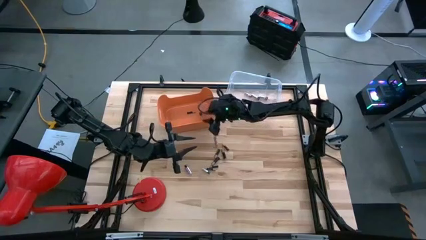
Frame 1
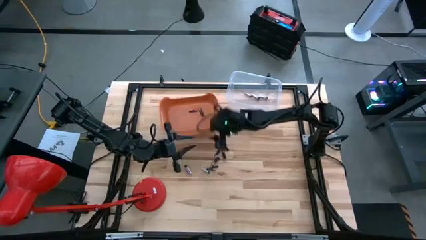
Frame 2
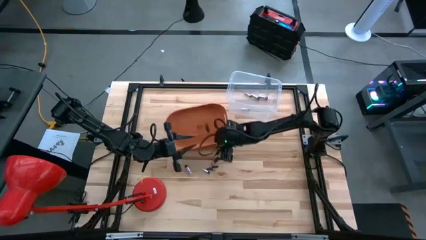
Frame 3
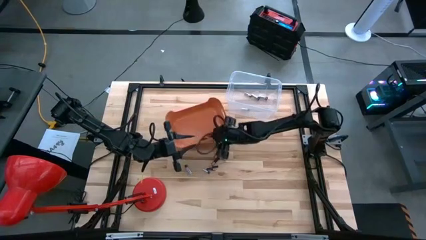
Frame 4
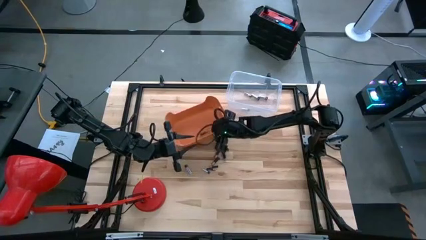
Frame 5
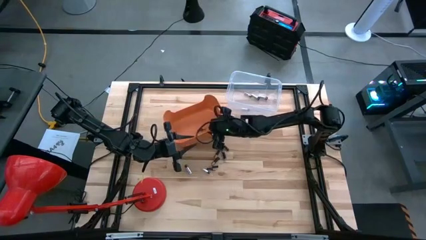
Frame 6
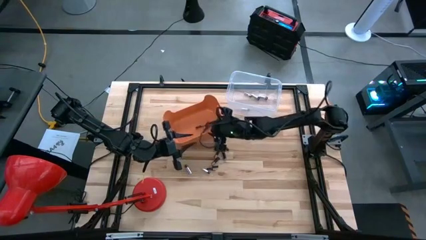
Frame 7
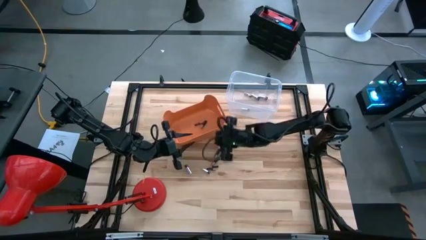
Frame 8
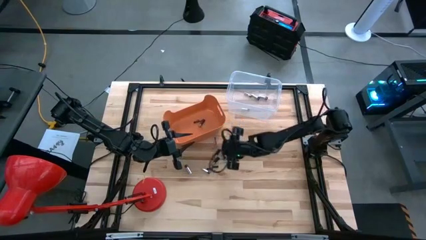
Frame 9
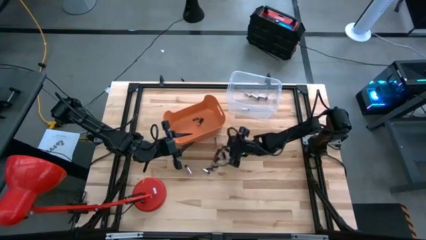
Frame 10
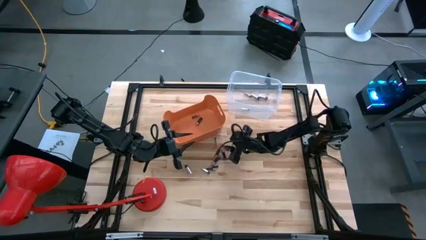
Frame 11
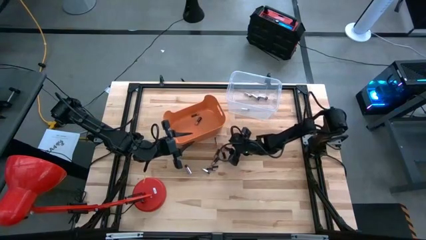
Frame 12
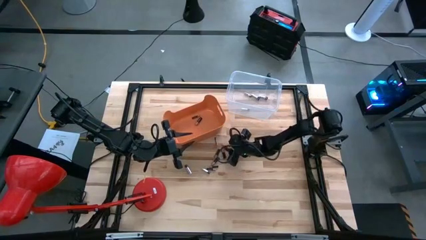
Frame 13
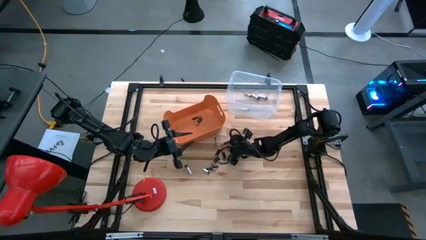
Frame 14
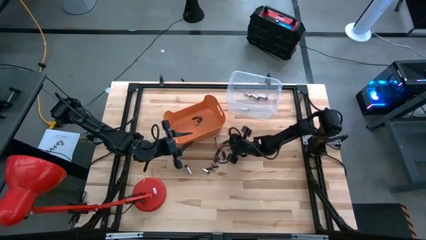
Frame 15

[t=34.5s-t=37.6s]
Task: Sort batteries
Put the black battery into the orange bin

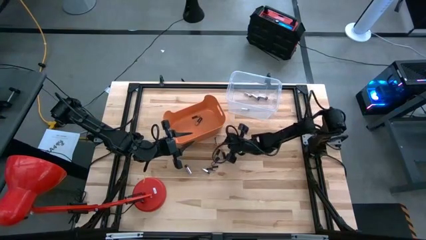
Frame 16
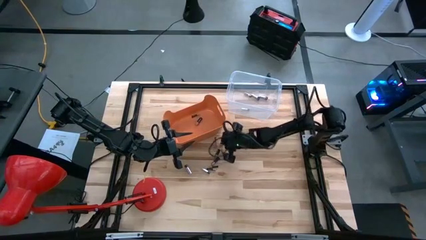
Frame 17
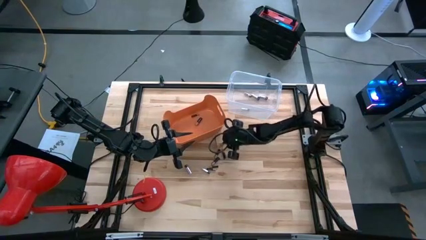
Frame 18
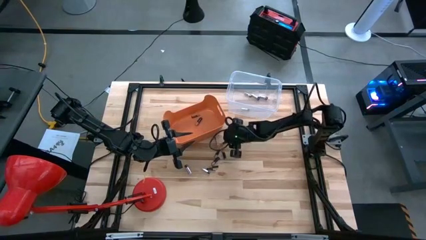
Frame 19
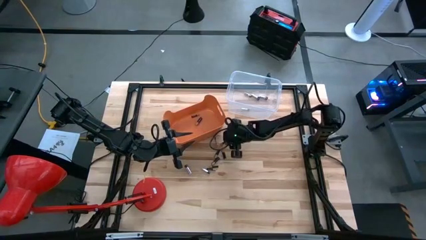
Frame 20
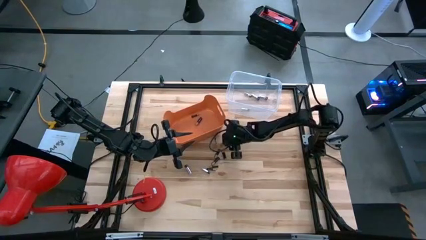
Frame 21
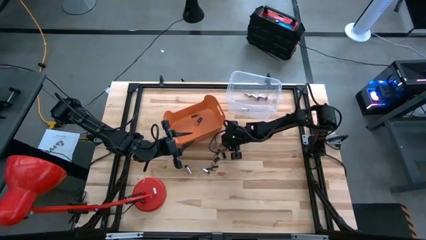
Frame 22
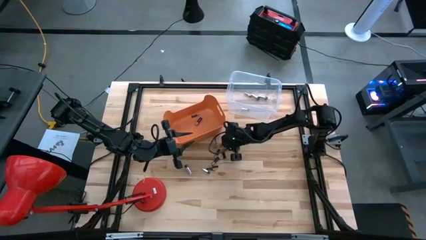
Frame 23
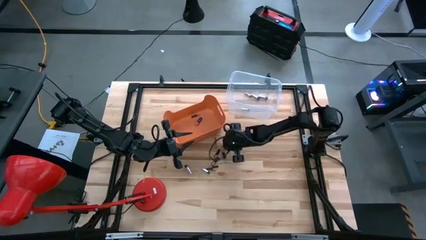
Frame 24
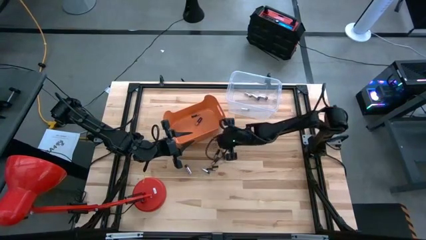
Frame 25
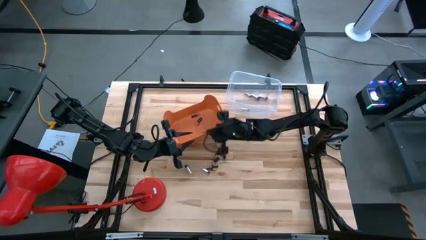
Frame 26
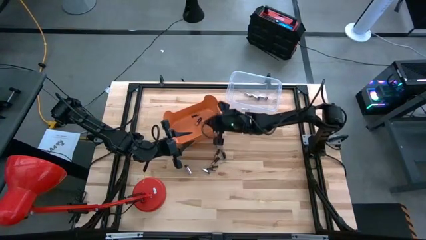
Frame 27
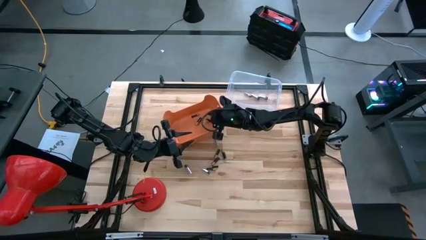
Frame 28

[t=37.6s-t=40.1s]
Put the black battery into the orange bin

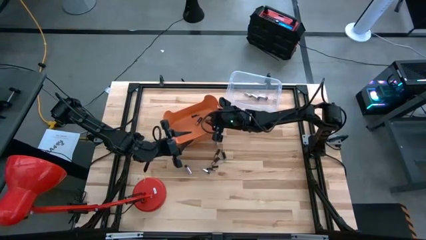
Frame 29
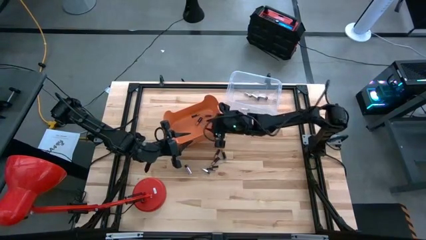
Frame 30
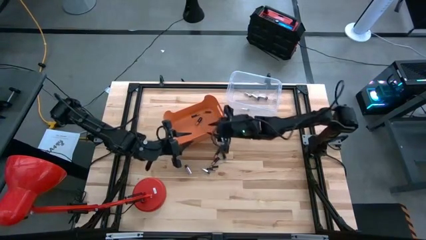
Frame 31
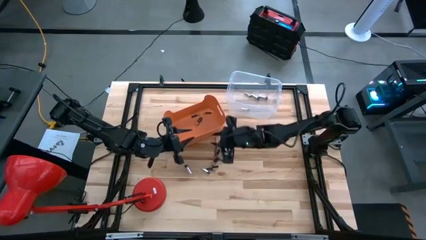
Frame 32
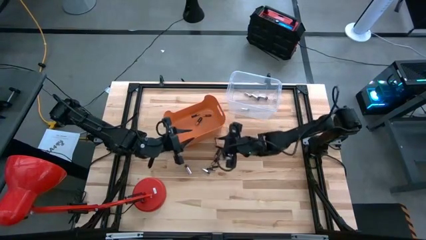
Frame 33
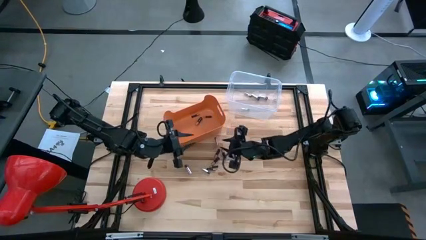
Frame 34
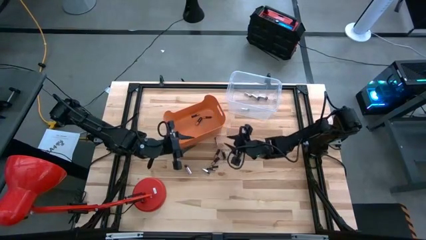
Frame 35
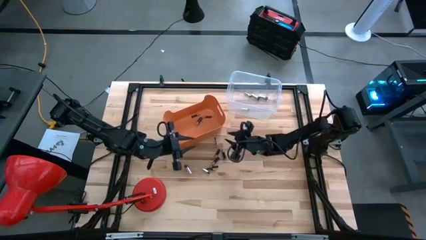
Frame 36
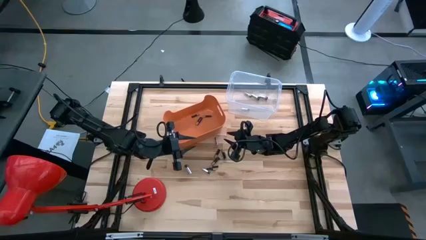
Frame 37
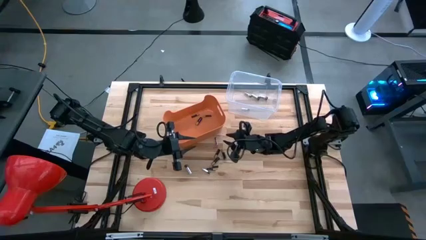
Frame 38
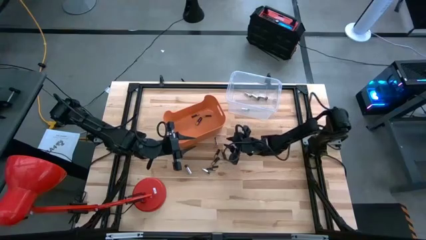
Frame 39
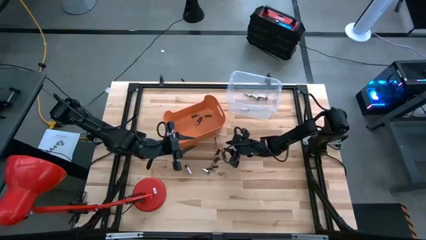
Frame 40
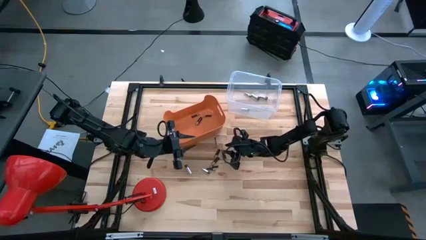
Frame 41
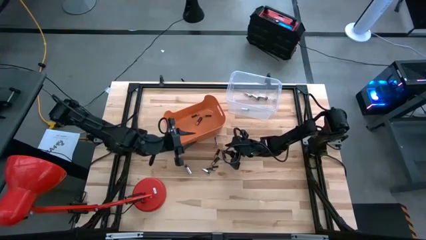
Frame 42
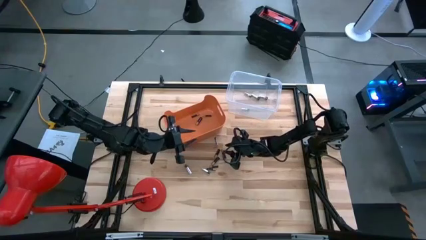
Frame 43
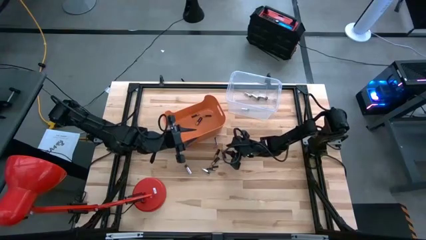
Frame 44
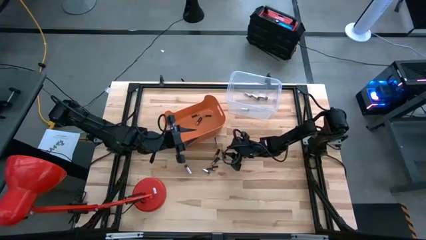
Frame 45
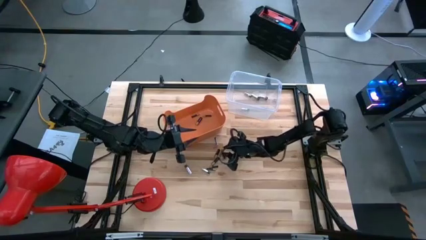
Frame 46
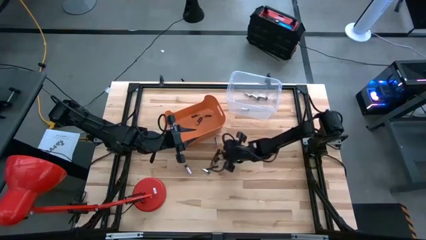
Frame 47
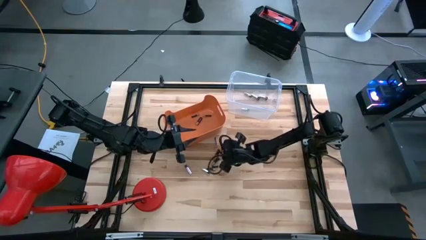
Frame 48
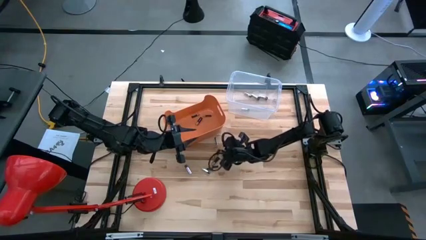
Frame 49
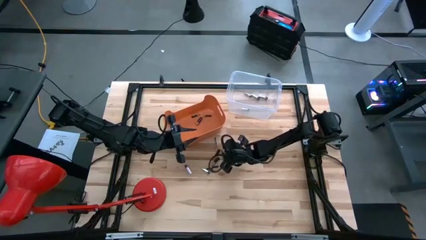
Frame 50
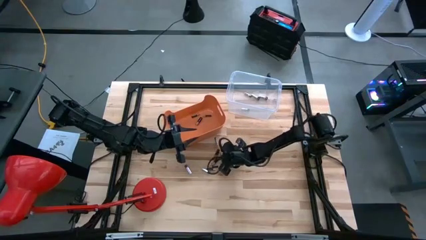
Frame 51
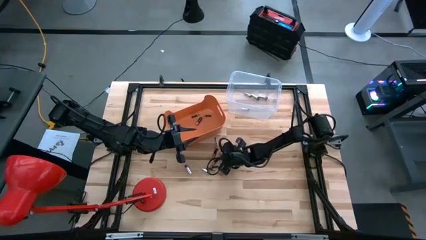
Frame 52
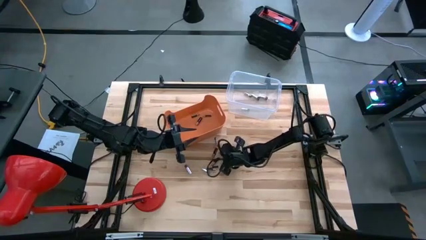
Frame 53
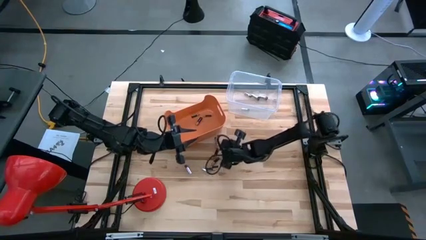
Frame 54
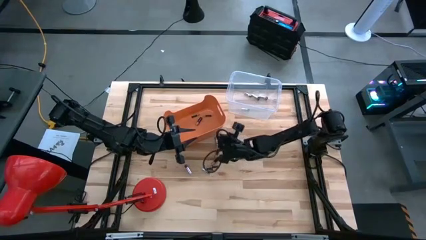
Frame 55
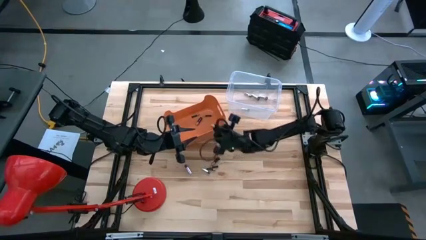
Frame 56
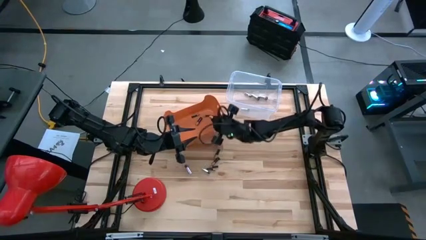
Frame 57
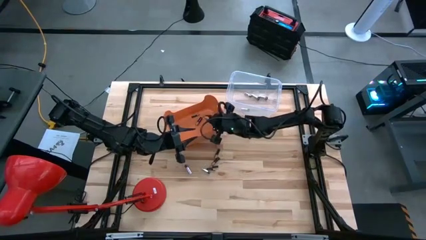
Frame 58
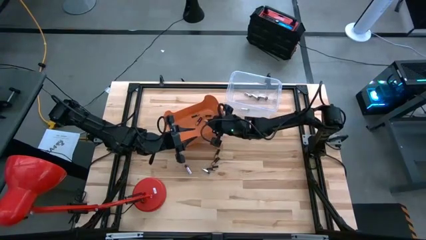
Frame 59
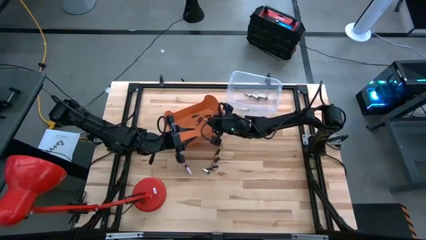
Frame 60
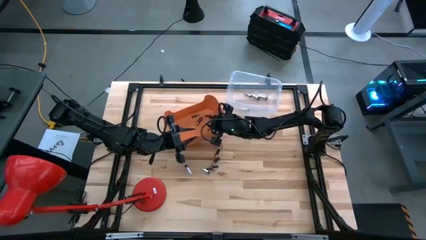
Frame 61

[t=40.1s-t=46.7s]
Put the black battery into the orange bin

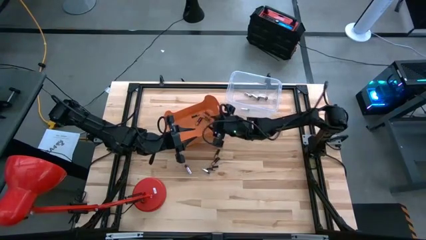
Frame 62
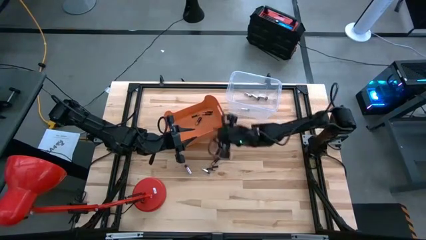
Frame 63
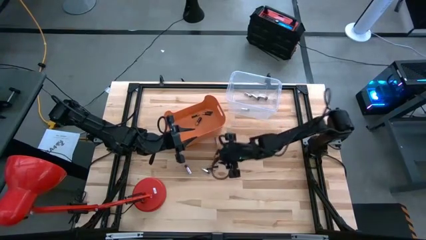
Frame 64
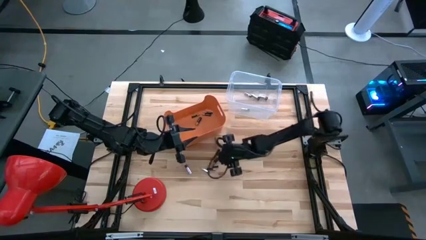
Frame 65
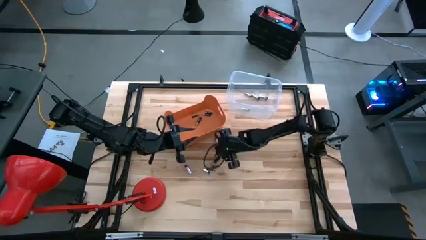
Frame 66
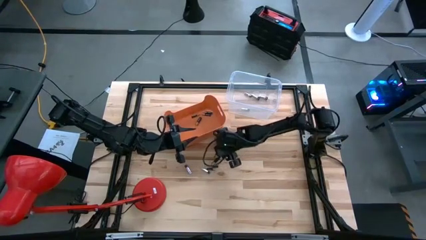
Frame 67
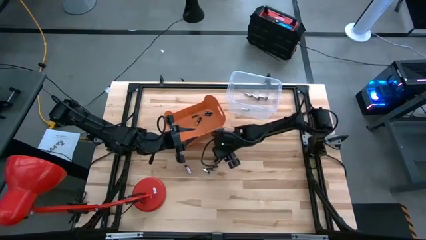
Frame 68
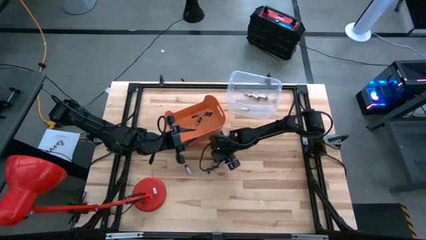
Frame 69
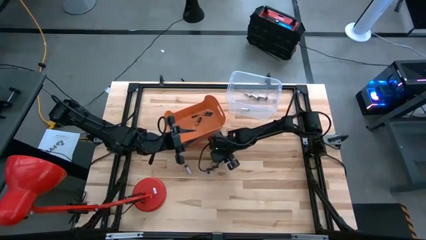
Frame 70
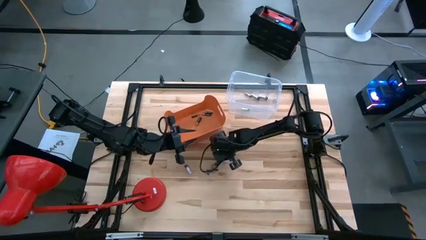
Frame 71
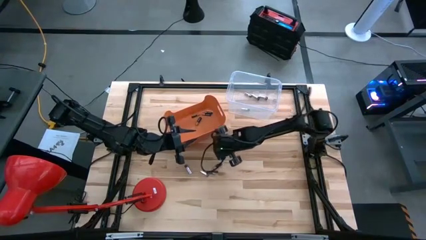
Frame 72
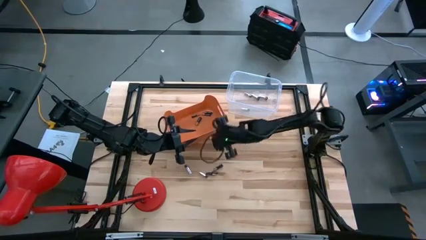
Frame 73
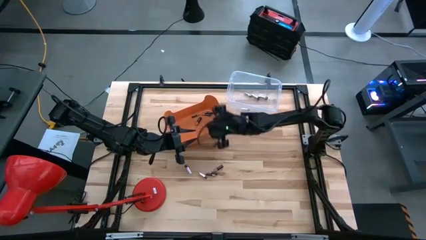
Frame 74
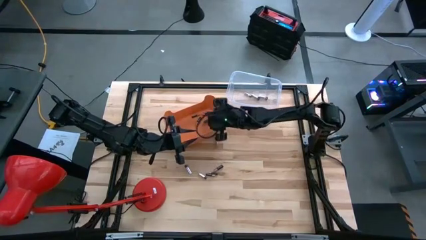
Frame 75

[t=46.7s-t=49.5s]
Put the black battery into the orange bin

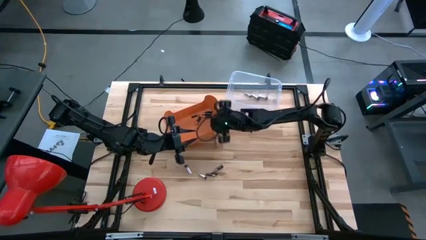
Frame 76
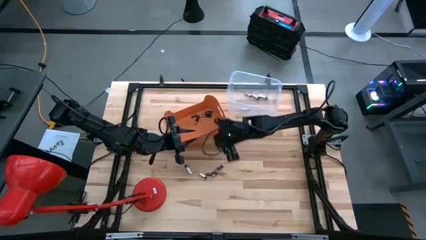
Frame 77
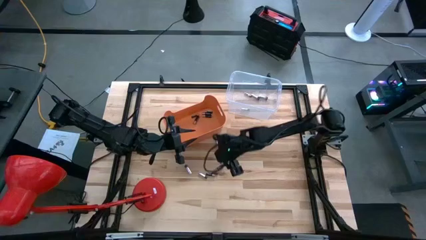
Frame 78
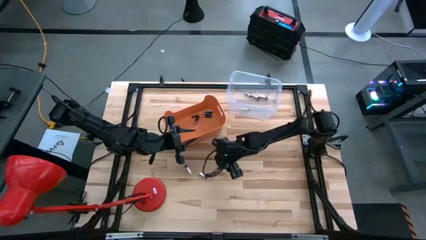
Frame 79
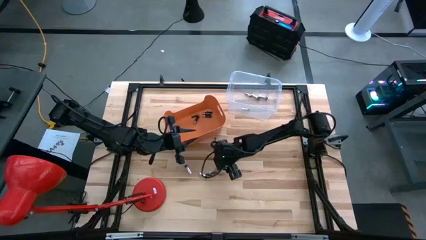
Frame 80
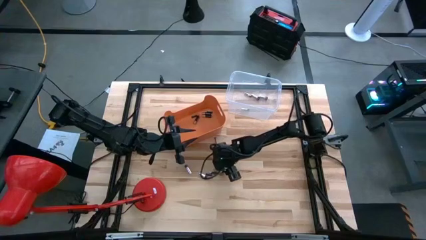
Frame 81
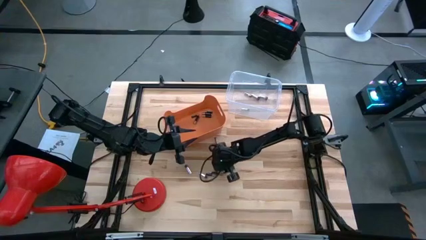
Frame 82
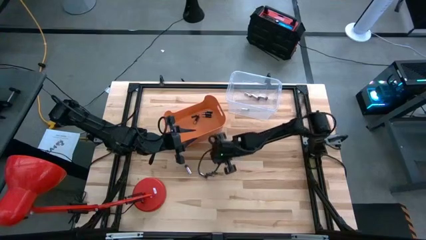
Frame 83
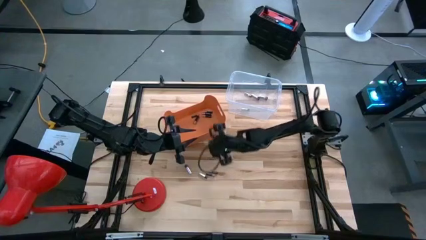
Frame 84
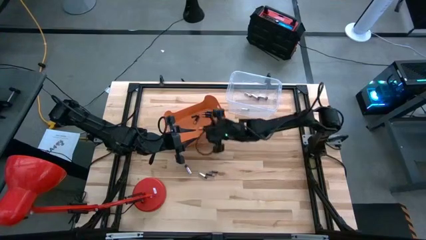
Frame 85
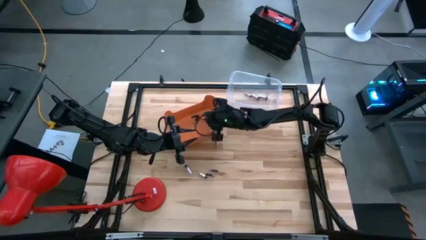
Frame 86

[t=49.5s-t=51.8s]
Put the black battery into the orange bin

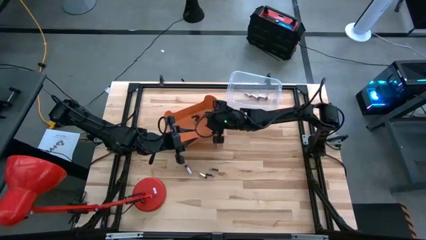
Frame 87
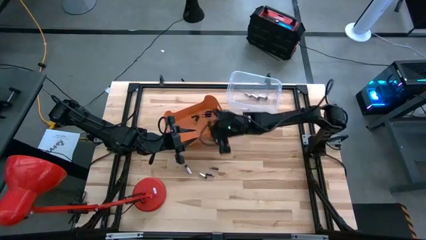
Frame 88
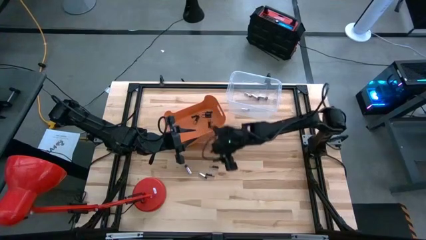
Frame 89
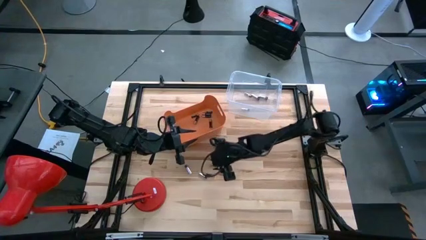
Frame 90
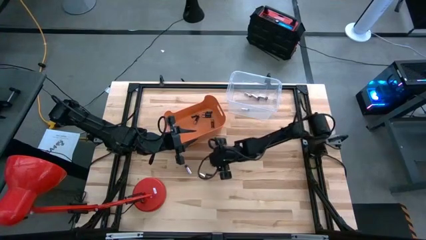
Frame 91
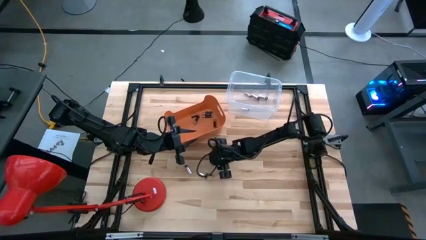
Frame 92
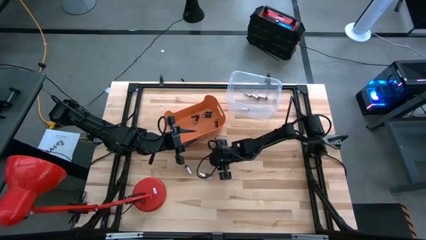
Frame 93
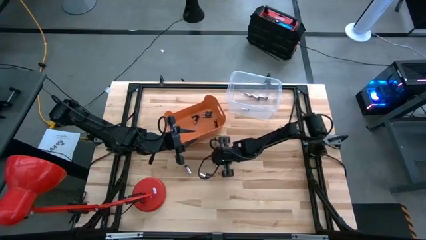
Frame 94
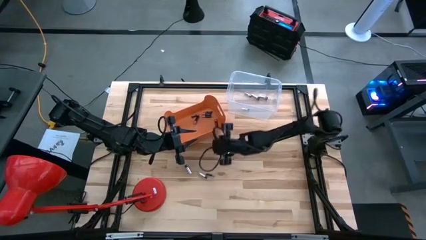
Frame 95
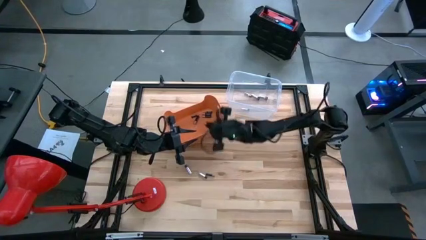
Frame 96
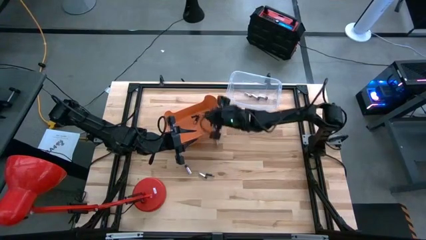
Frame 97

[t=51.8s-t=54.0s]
Put the black battery into the orange bin
